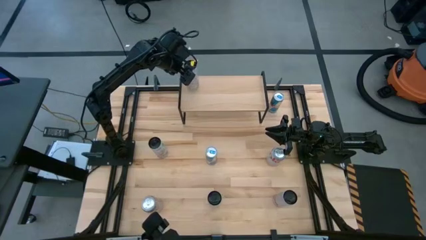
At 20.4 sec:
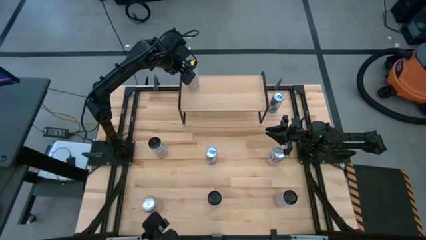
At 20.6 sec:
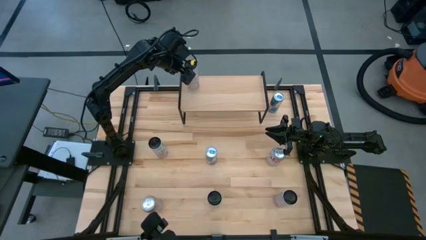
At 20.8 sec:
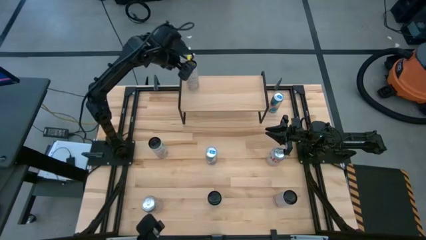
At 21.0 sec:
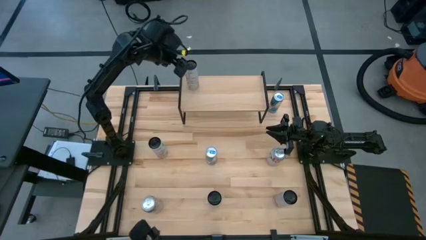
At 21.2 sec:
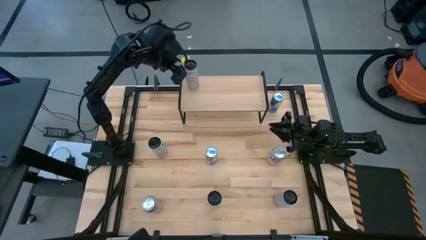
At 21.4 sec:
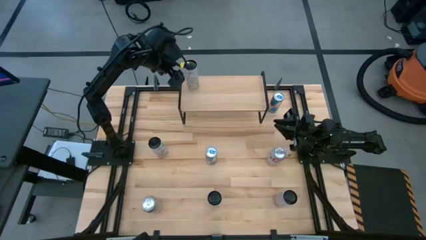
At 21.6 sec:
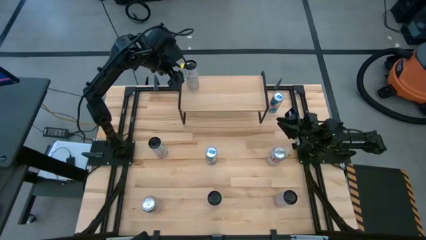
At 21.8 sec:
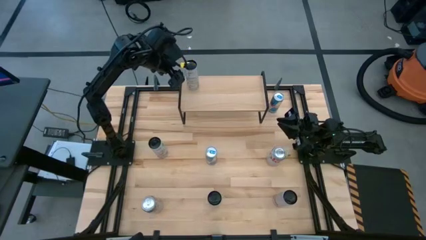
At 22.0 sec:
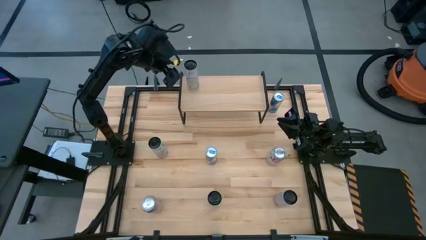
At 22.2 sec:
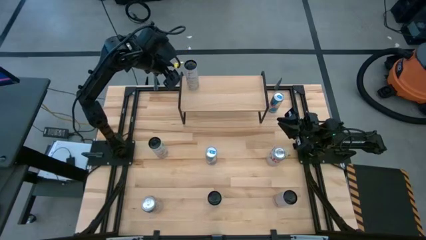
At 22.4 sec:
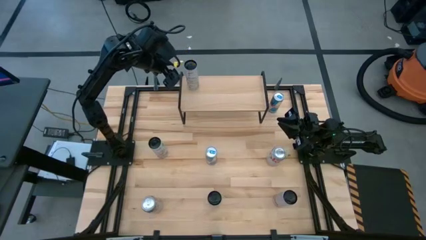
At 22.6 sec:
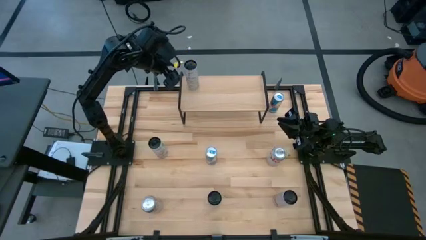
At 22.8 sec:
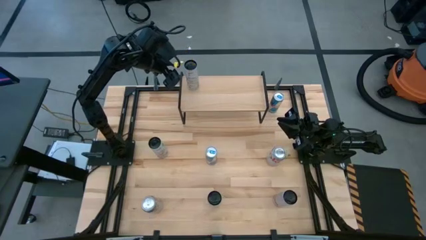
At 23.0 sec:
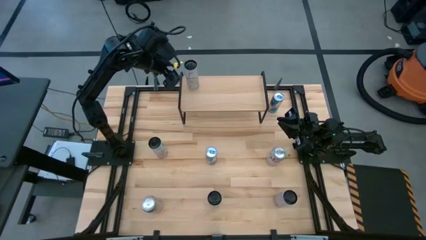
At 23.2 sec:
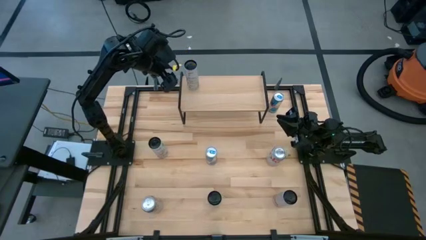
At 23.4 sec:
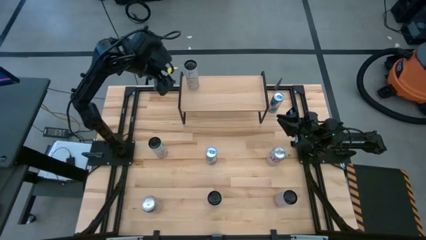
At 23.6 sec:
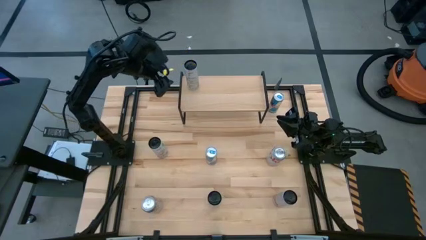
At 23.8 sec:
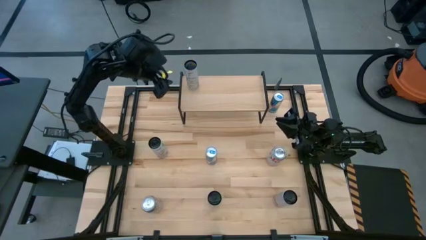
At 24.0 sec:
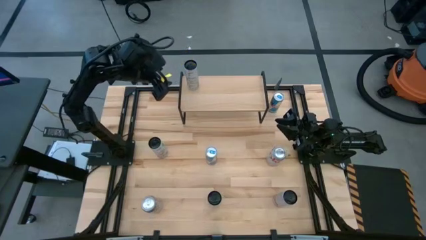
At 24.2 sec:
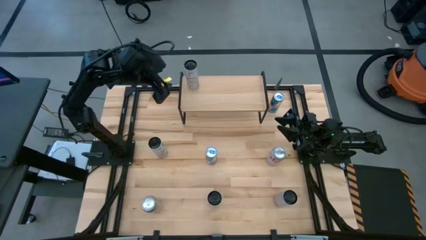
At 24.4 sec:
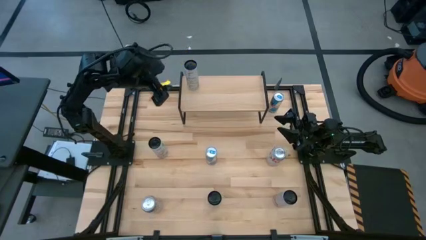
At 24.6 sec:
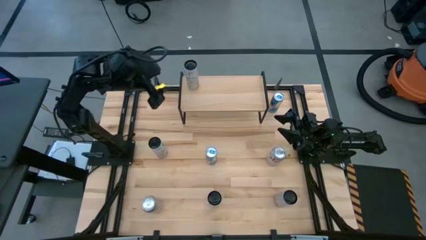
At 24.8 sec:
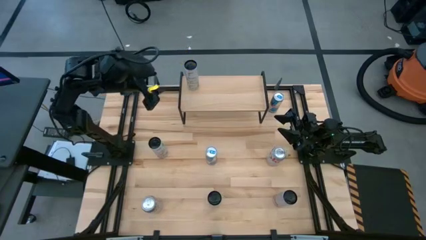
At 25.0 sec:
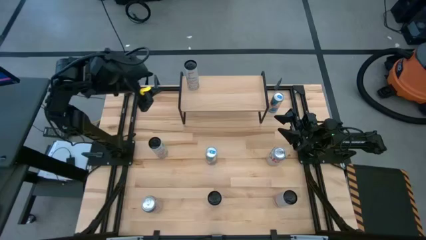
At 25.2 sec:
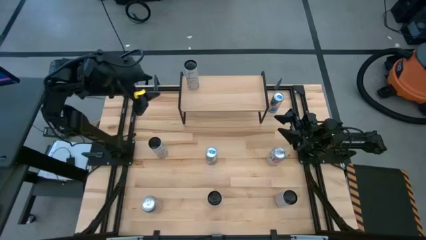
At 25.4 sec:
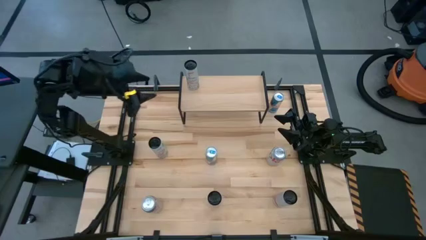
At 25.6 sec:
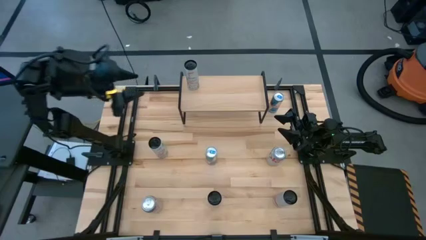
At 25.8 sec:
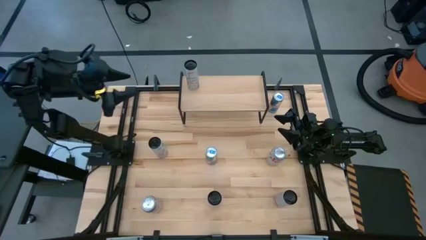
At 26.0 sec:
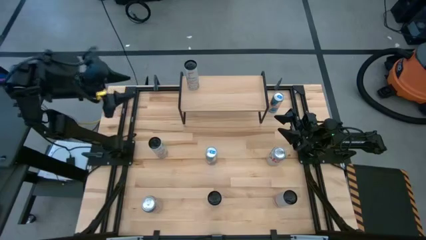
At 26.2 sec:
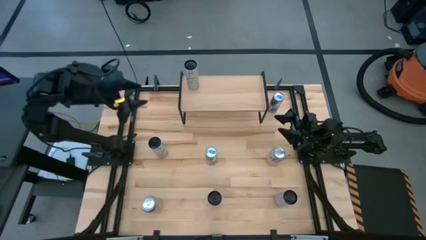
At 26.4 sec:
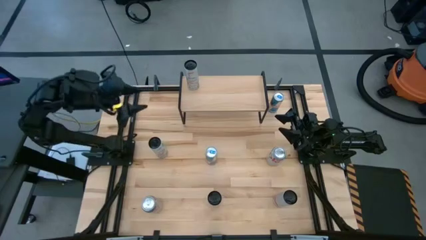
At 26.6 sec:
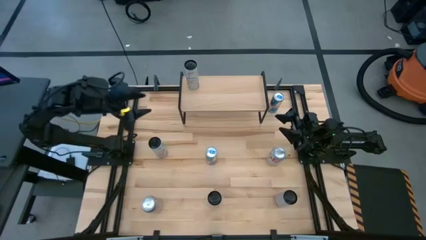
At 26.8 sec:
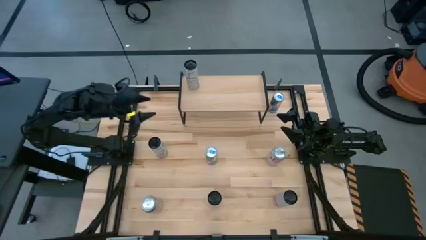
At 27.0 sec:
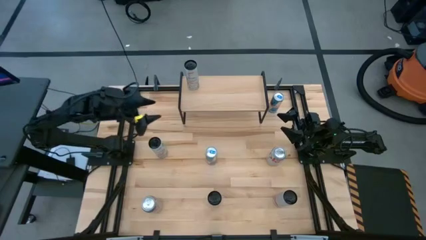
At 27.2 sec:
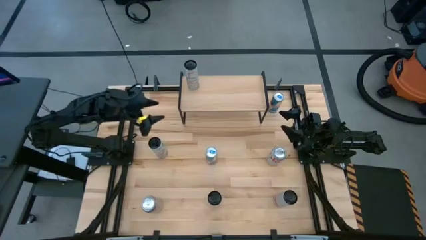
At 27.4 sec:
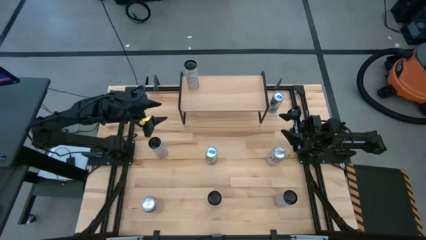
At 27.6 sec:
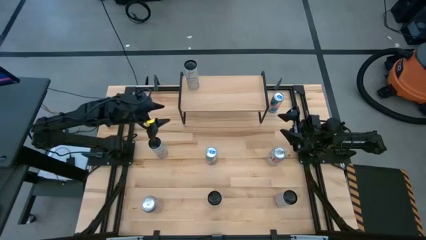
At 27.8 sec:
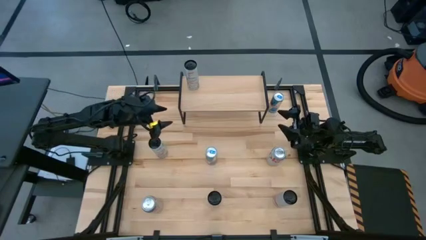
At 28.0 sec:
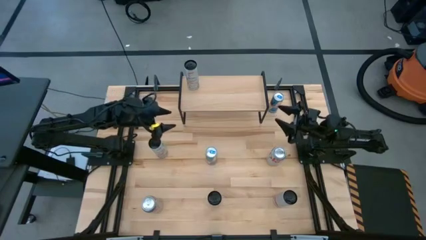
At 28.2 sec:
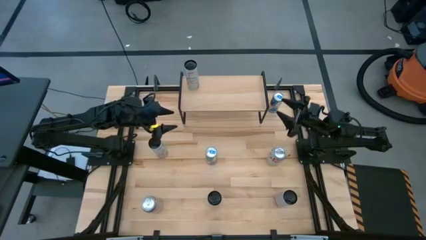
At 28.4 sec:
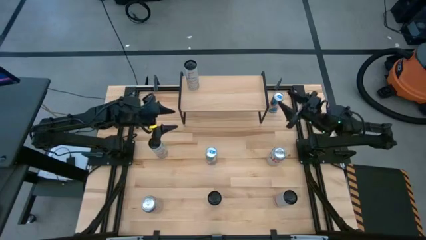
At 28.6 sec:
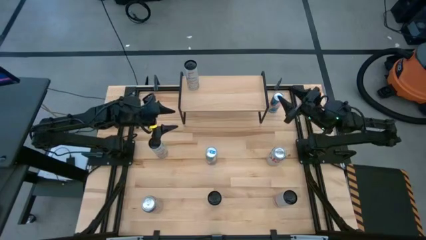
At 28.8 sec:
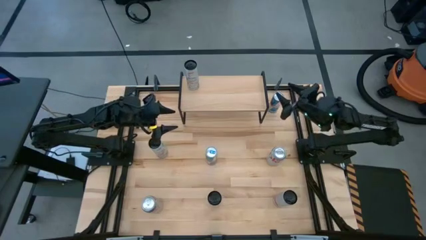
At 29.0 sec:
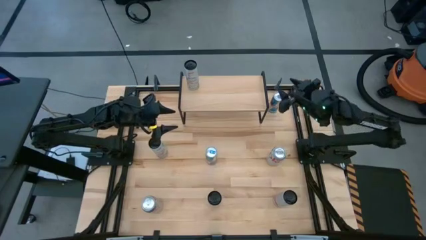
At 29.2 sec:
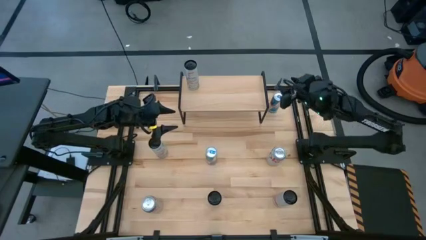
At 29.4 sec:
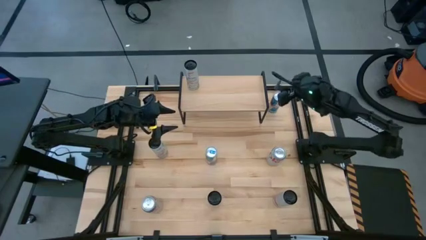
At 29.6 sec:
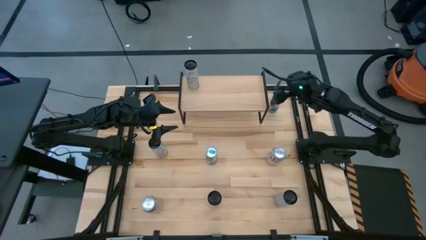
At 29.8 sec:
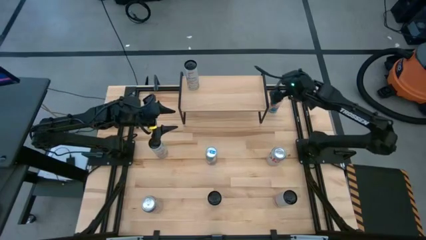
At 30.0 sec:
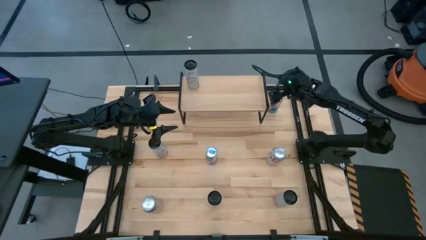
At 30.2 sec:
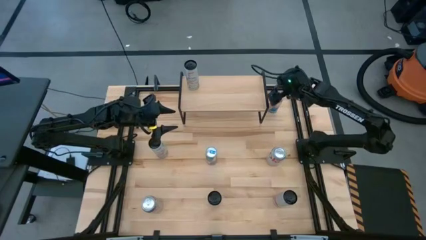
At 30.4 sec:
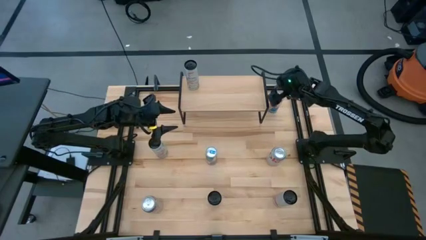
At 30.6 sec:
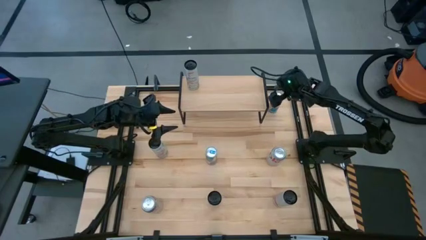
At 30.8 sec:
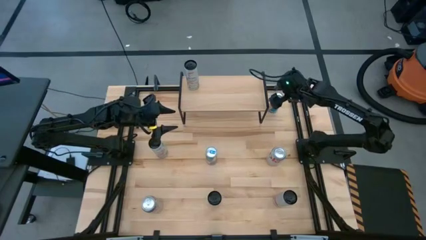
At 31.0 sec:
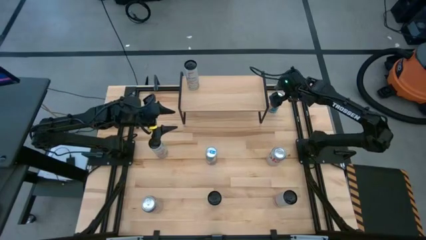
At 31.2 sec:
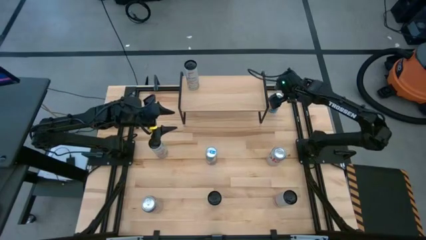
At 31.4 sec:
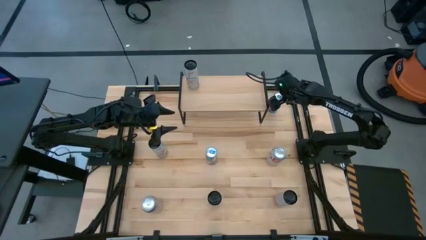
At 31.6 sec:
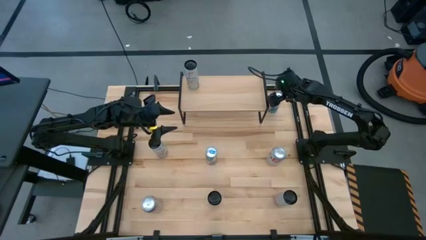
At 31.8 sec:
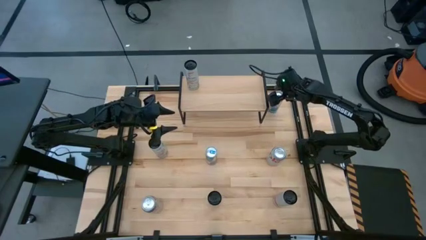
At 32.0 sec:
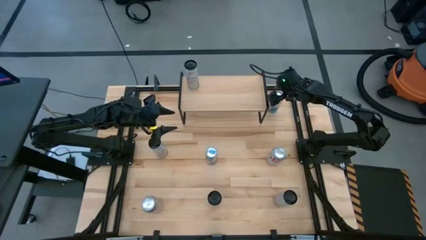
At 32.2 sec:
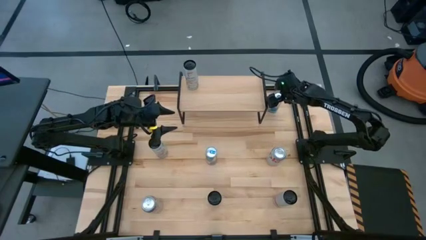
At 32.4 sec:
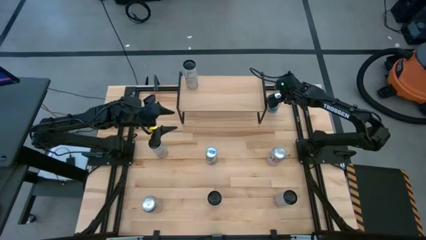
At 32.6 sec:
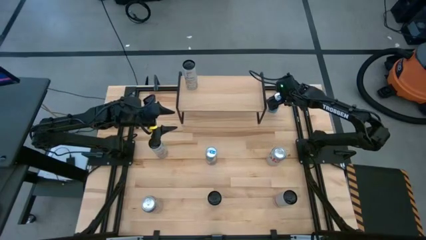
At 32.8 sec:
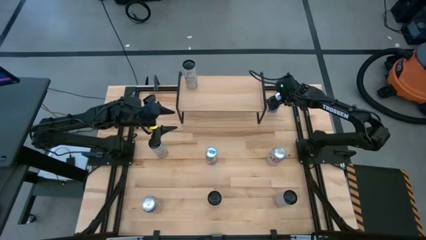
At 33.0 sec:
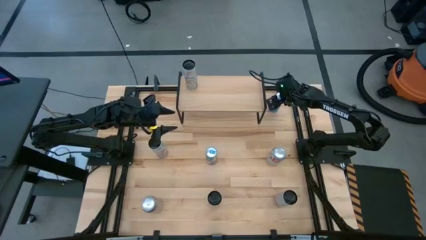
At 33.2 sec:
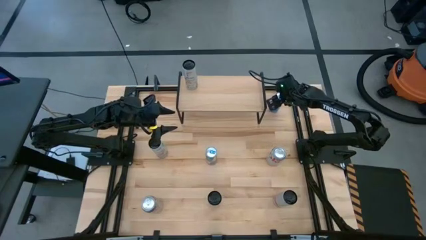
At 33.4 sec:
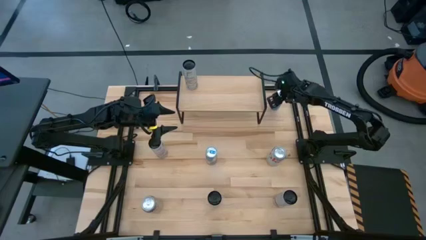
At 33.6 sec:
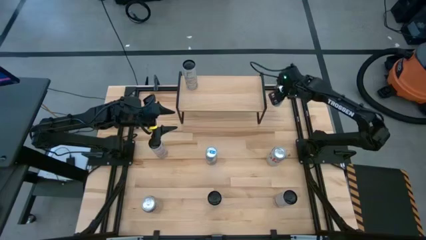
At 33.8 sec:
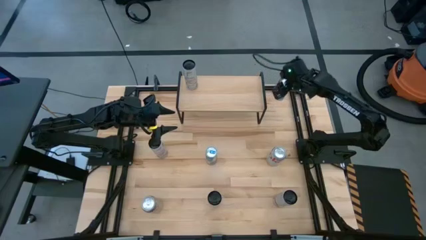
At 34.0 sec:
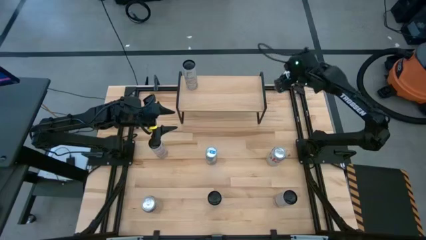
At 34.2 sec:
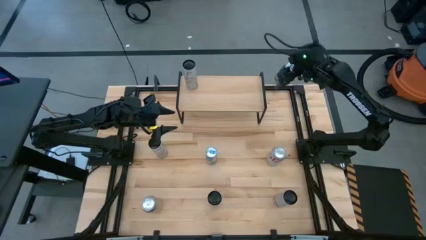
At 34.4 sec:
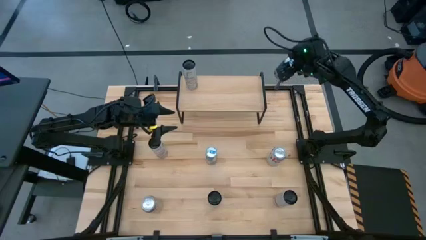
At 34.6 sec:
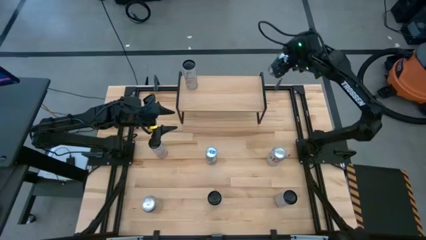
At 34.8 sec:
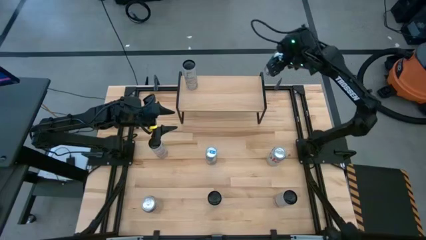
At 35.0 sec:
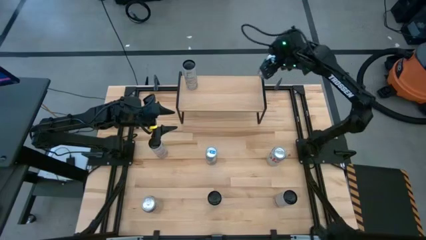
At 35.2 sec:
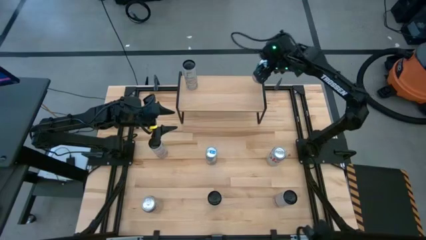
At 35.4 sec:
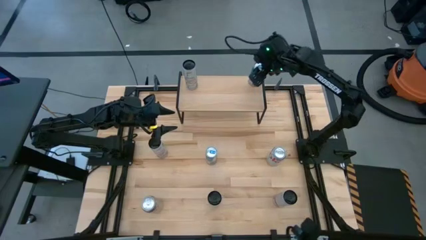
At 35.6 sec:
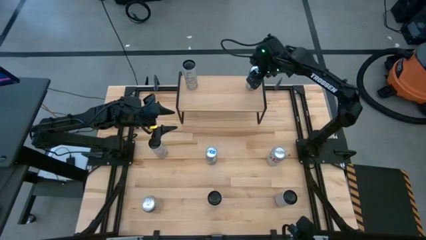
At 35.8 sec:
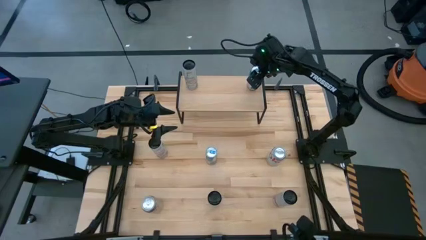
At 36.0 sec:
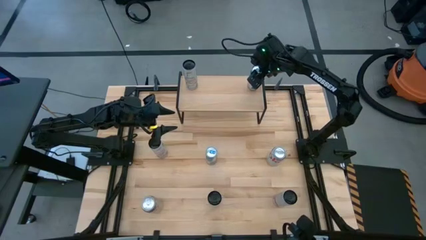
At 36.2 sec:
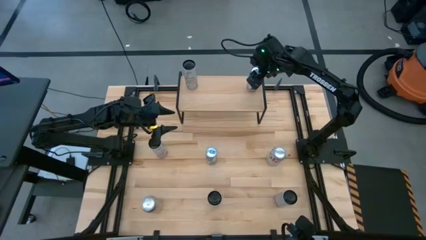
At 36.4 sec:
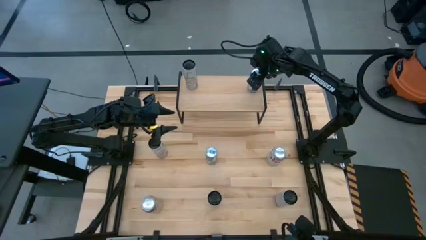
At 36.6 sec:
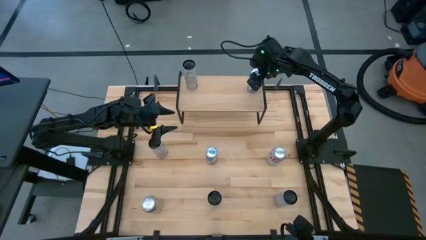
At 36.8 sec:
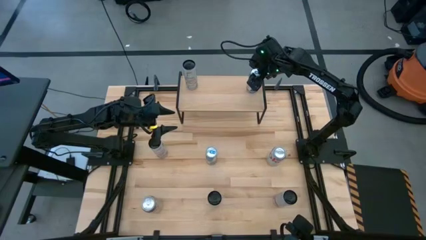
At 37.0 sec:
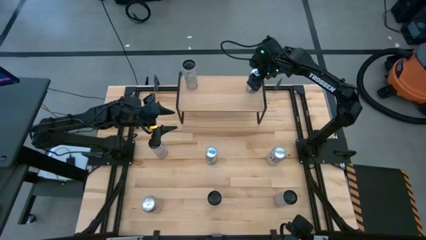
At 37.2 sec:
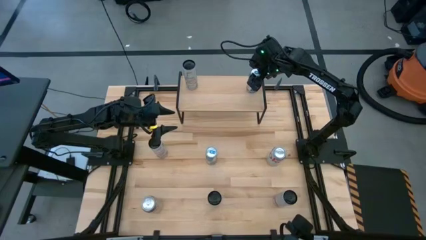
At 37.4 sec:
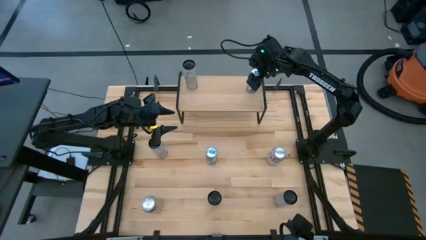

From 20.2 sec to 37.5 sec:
Task: Place canned beverage on shelf
Put the top blue soda can on the shelf
